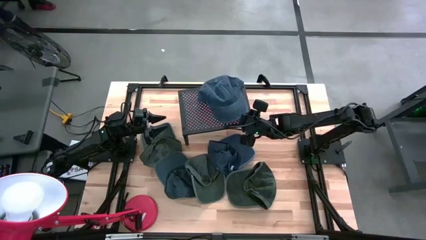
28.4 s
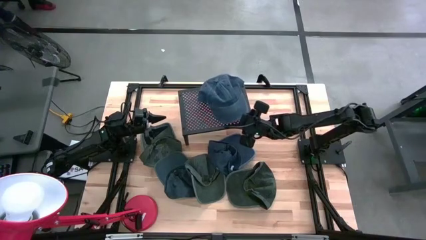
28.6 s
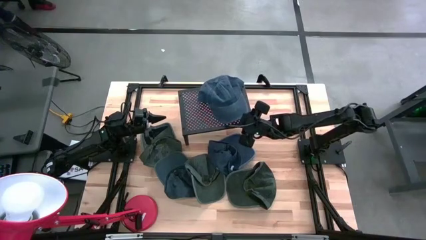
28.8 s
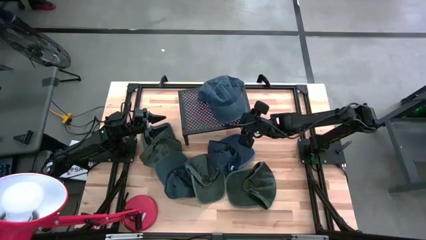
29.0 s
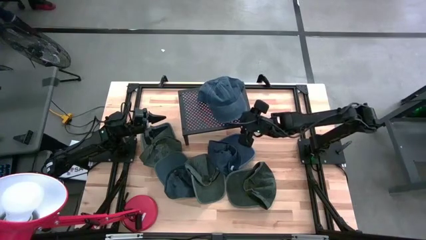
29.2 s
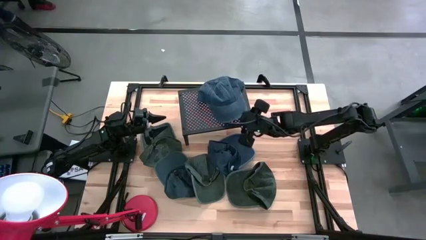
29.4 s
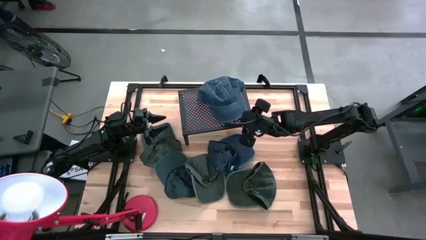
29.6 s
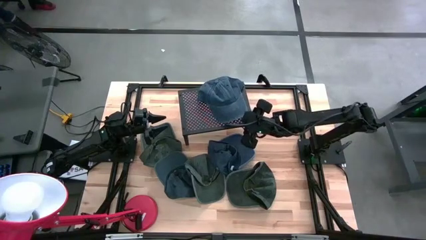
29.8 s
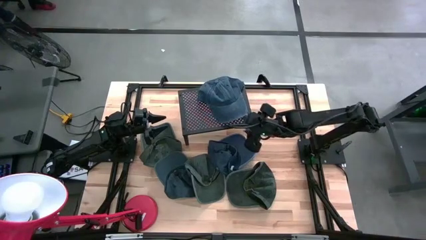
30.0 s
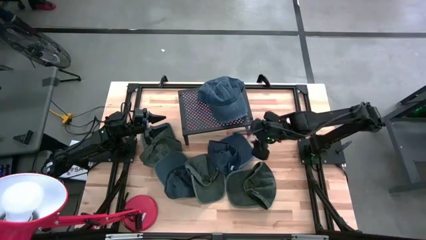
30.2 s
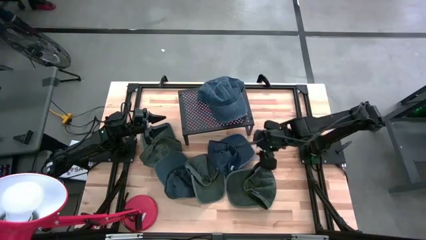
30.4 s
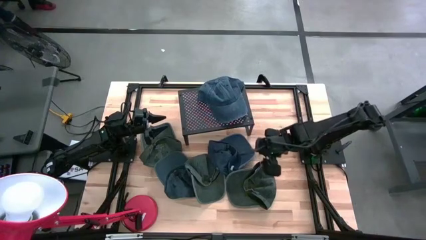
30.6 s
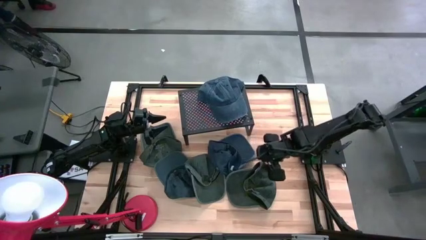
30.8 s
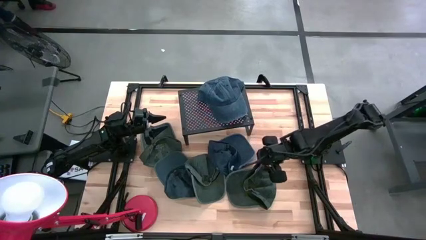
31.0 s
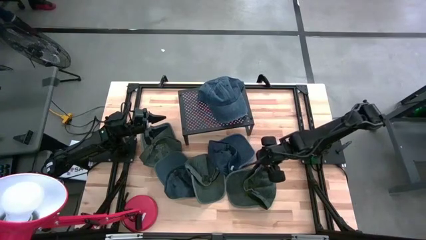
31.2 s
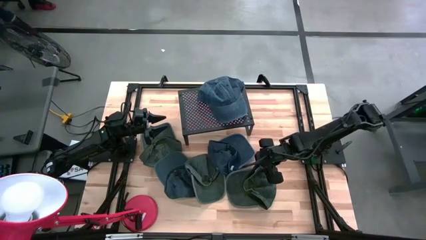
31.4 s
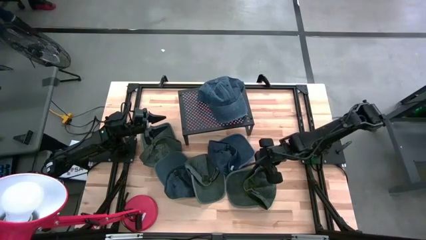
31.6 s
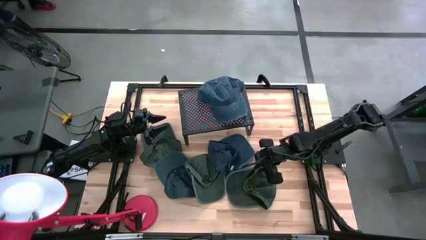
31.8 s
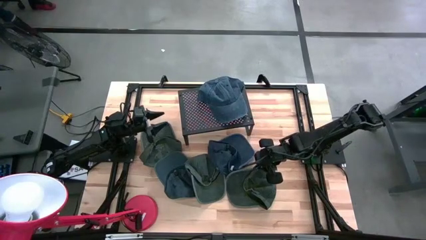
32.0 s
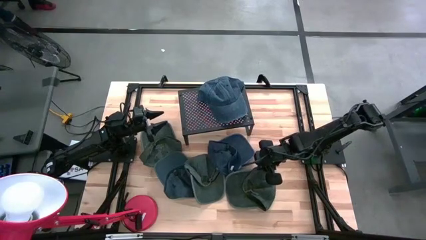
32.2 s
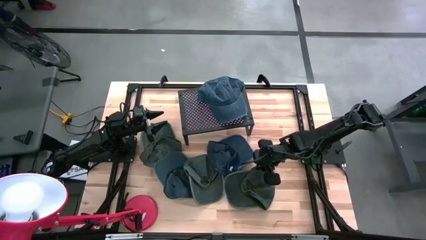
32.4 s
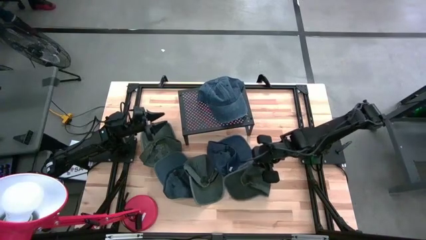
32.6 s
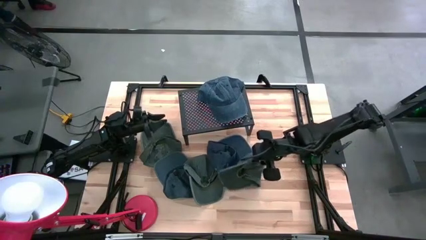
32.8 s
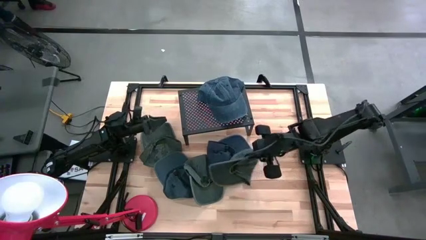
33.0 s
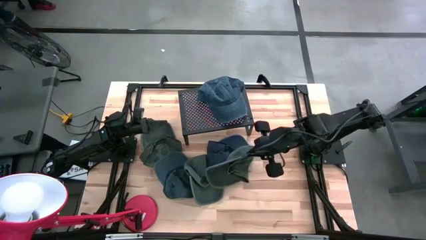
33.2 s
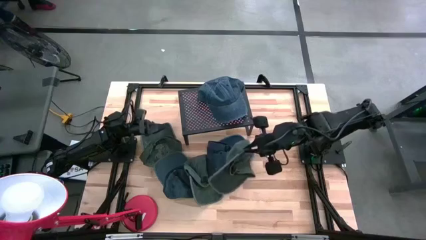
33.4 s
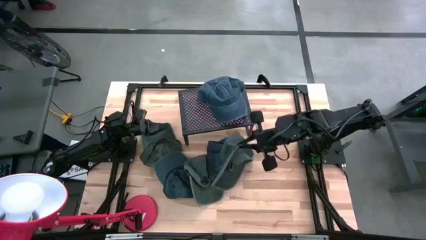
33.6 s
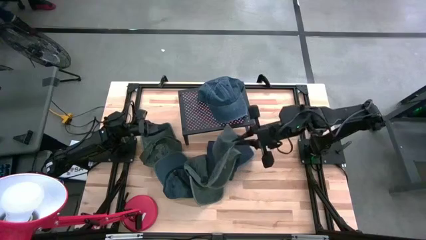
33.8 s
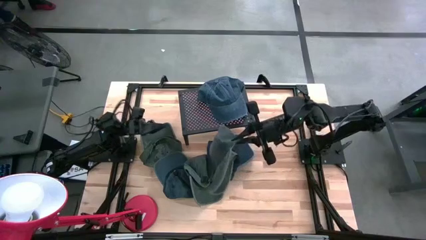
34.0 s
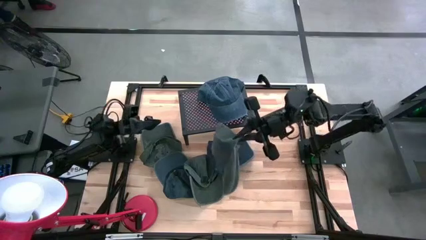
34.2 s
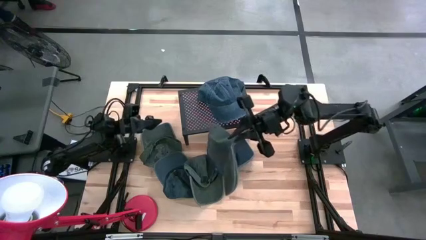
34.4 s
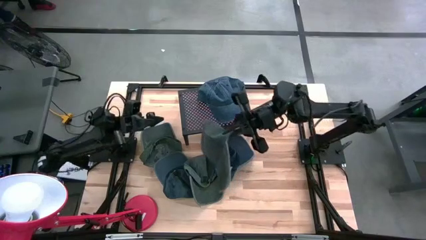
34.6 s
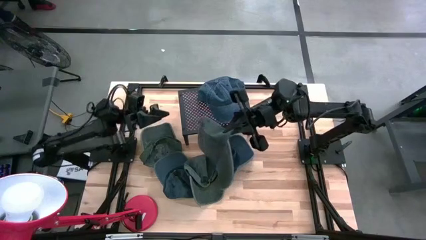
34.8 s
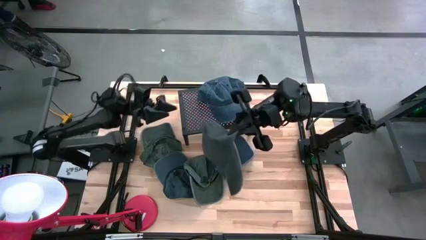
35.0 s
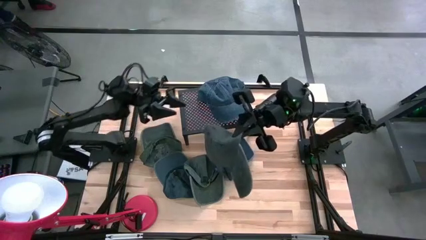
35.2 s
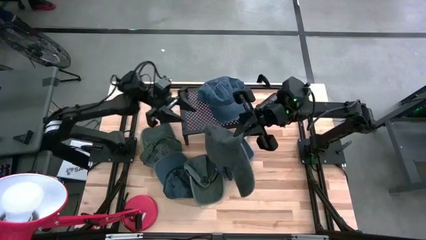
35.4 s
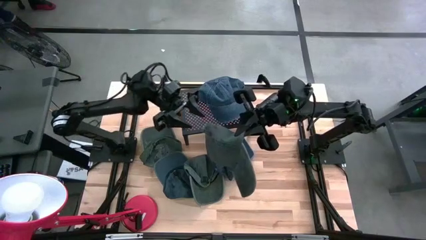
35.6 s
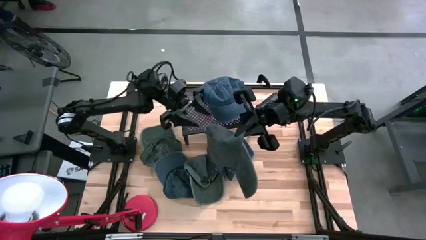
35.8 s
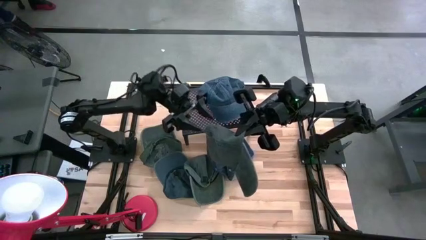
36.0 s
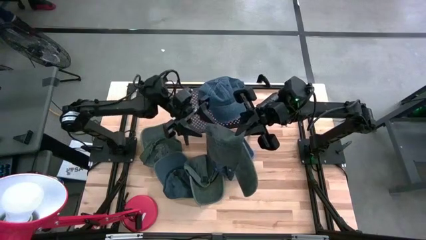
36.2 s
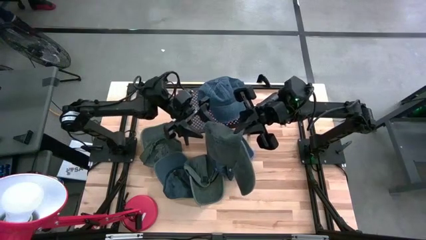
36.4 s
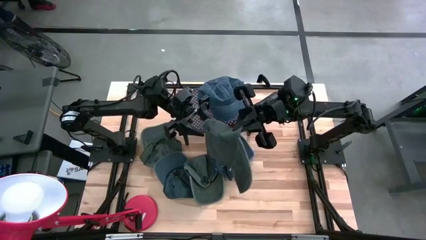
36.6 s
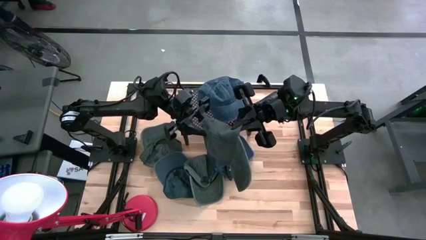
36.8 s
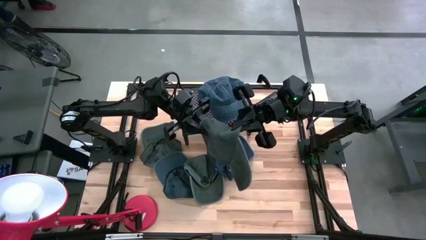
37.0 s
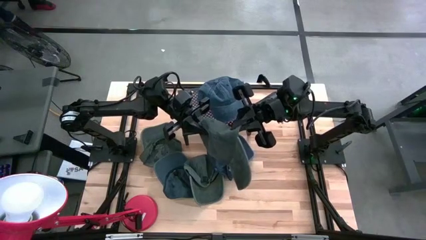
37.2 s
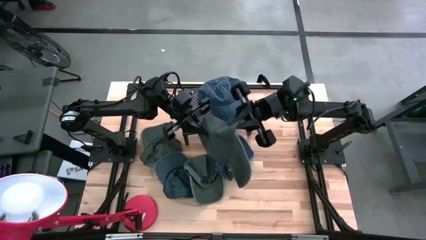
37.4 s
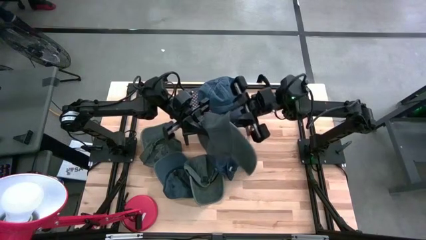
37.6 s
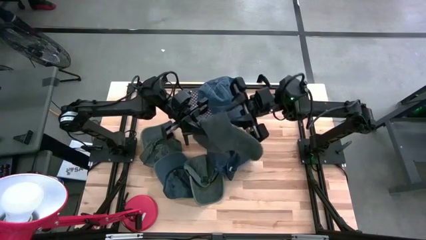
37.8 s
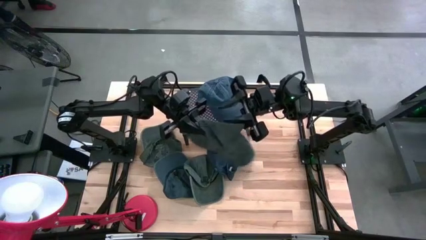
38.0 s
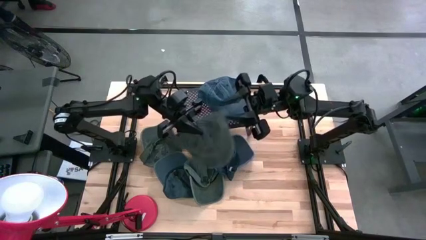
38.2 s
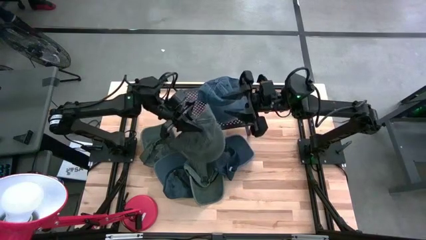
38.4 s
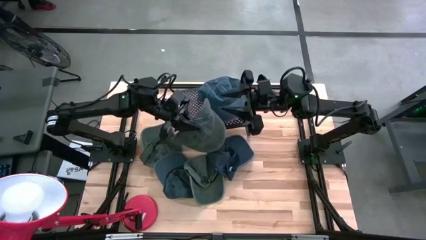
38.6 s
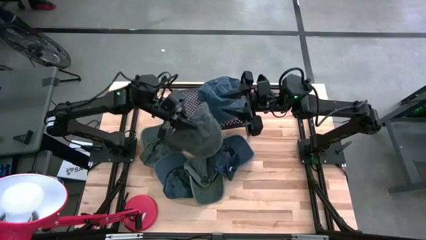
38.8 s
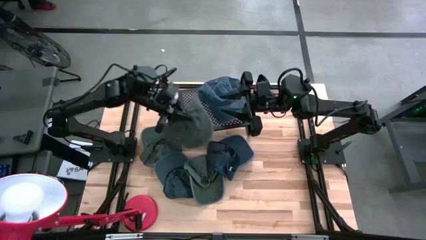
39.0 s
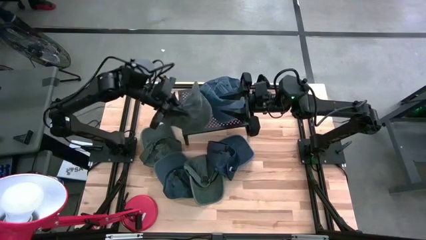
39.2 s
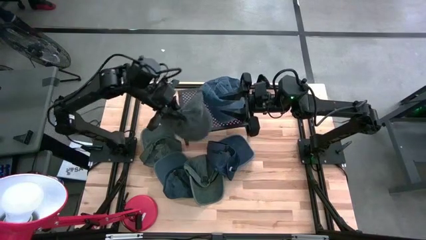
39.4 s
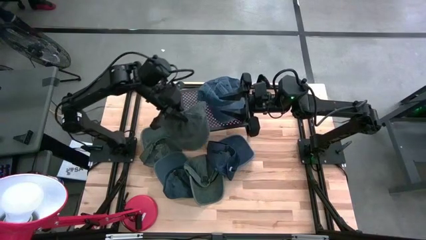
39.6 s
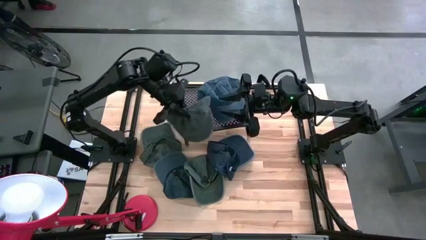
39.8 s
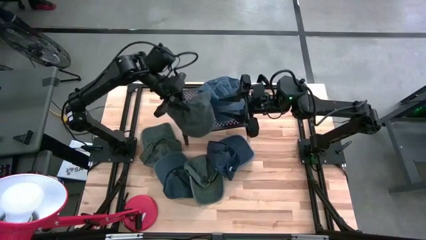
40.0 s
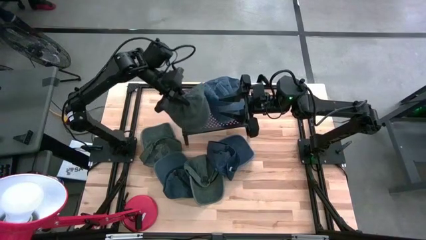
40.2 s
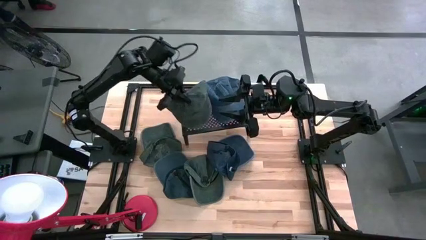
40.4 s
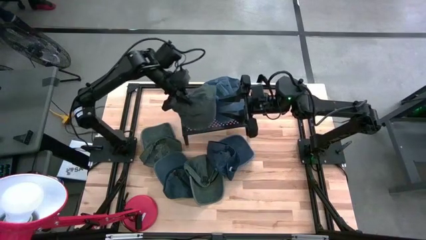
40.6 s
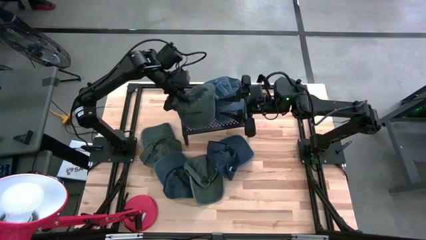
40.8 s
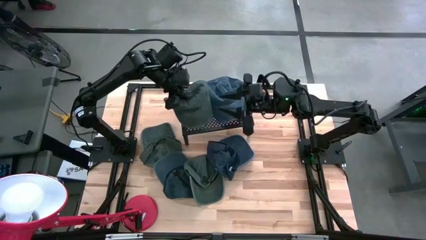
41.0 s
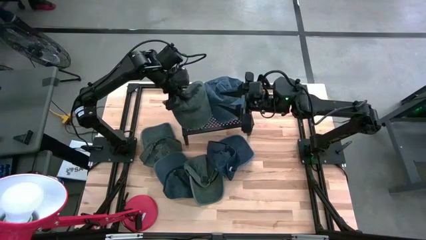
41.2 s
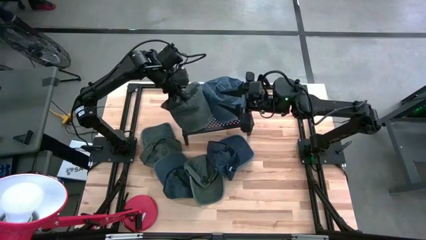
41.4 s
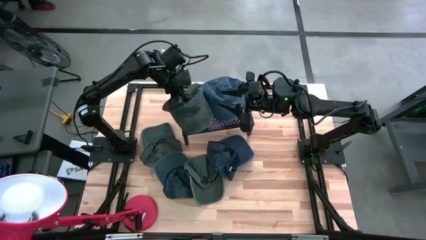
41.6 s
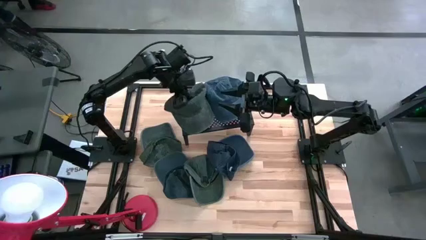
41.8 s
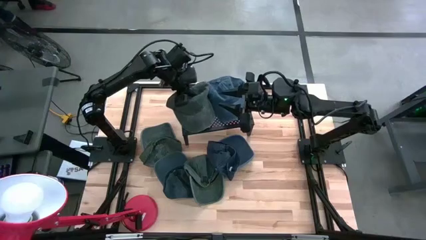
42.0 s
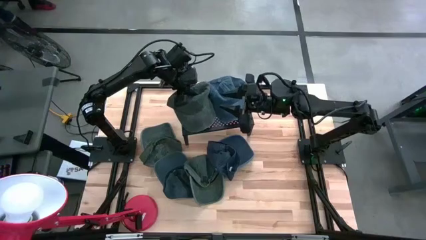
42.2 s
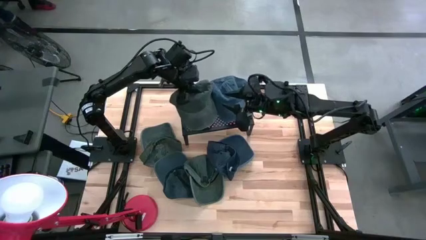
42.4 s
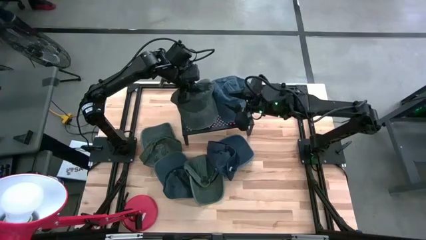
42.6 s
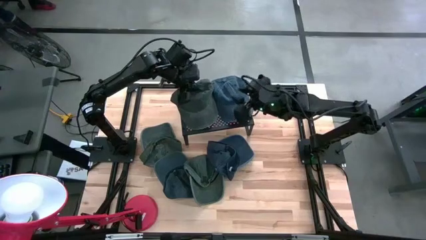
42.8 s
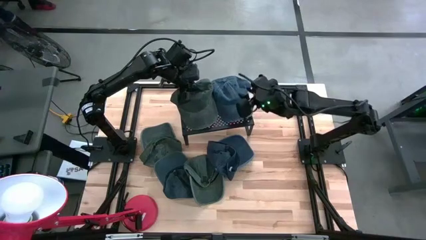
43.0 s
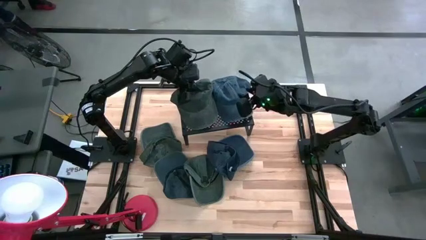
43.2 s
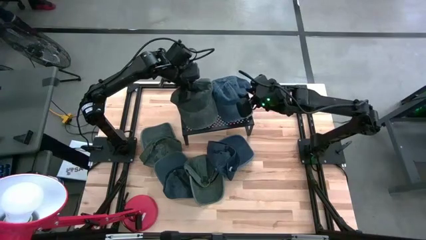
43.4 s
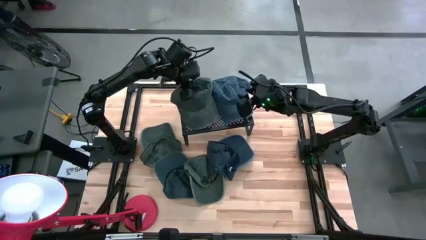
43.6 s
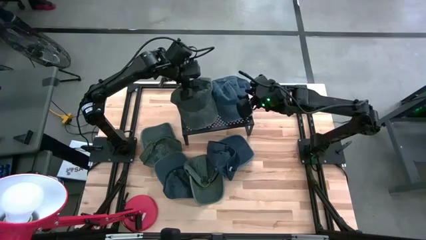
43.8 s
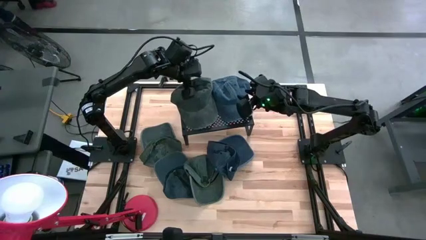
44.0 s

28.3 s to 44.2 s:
Task: Pick & Place hat
Stack the dark green cap on the shelf
